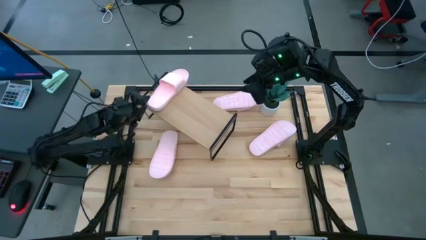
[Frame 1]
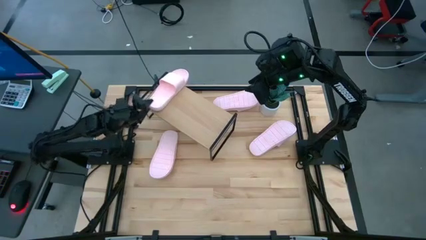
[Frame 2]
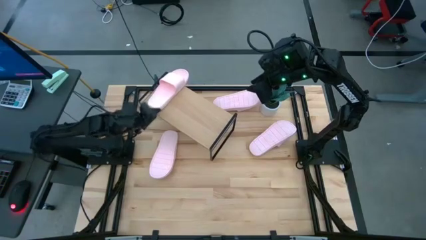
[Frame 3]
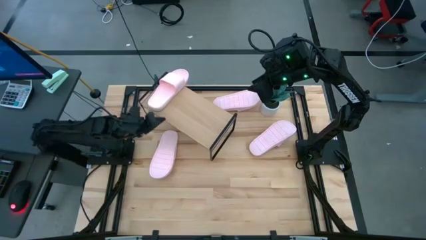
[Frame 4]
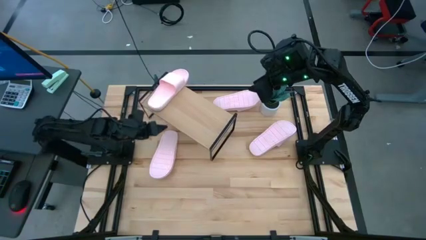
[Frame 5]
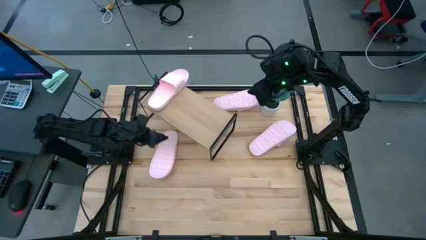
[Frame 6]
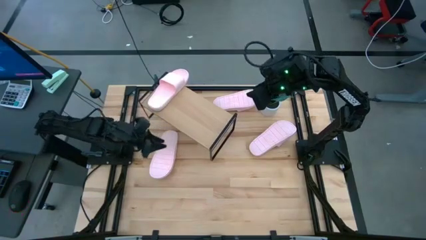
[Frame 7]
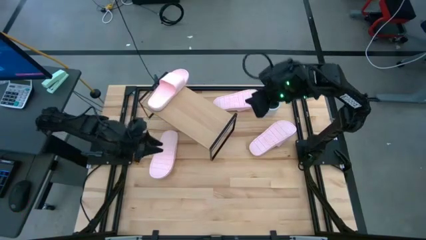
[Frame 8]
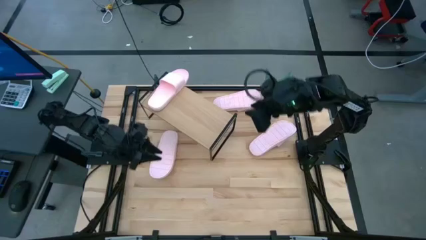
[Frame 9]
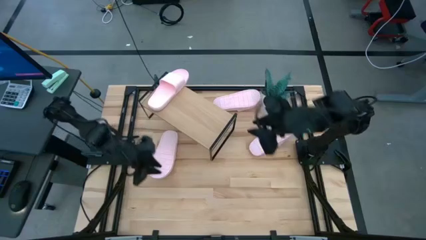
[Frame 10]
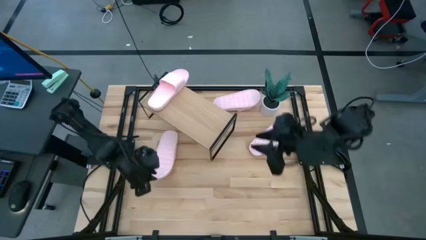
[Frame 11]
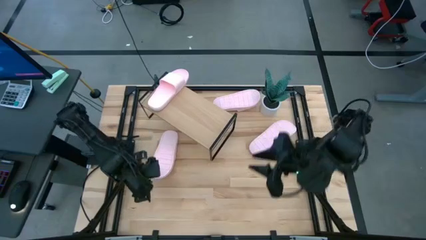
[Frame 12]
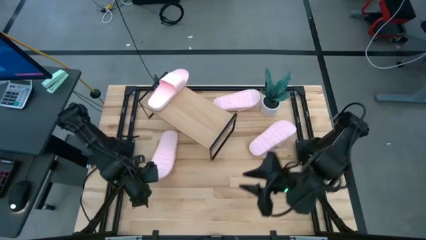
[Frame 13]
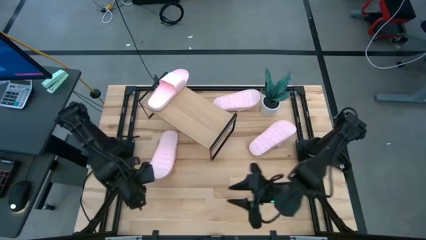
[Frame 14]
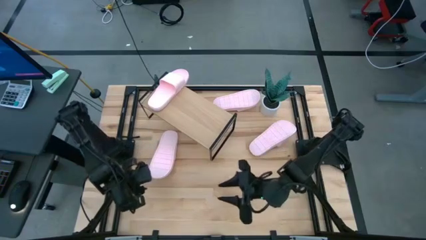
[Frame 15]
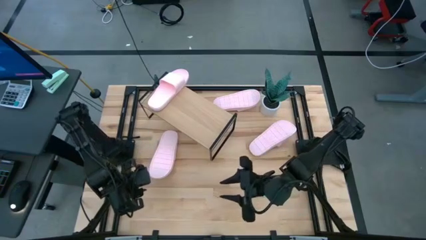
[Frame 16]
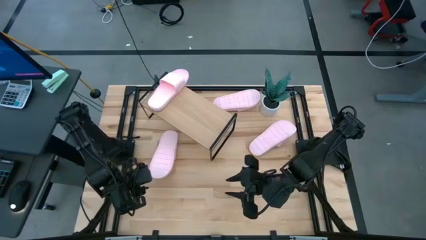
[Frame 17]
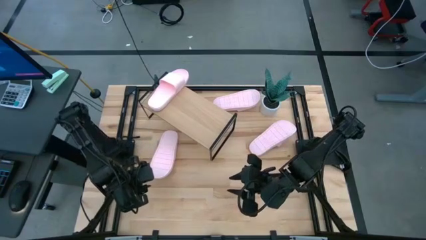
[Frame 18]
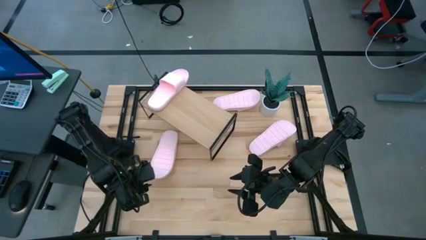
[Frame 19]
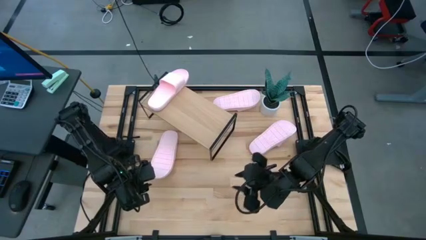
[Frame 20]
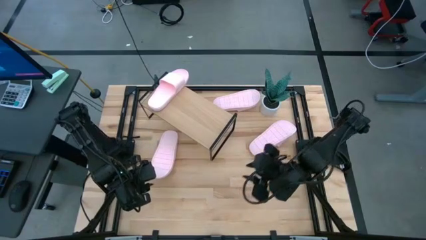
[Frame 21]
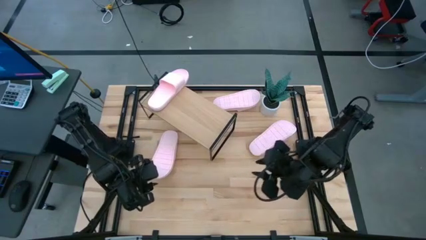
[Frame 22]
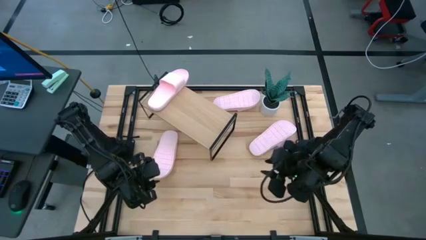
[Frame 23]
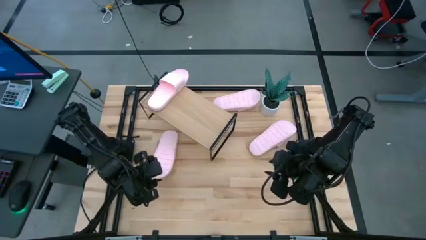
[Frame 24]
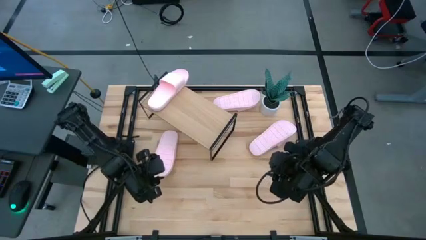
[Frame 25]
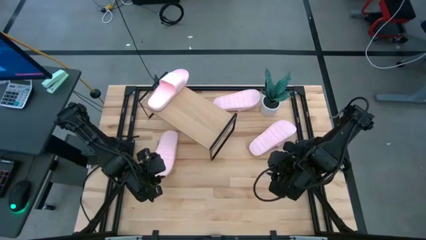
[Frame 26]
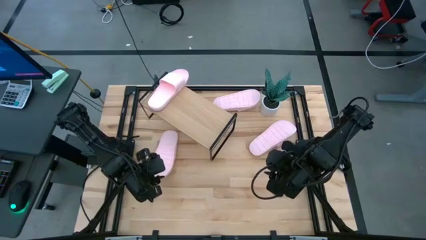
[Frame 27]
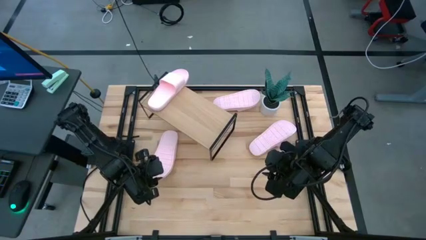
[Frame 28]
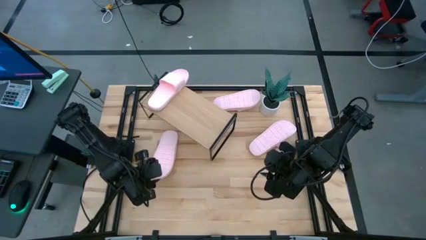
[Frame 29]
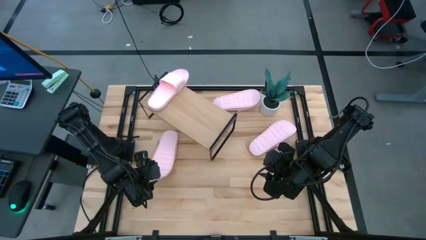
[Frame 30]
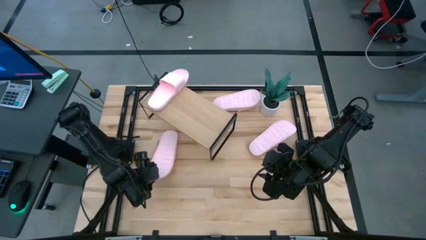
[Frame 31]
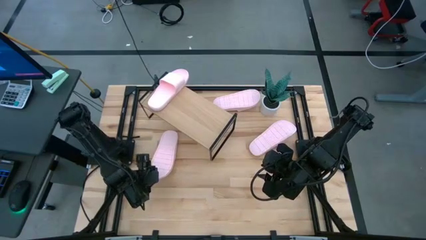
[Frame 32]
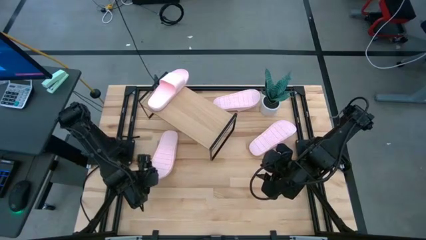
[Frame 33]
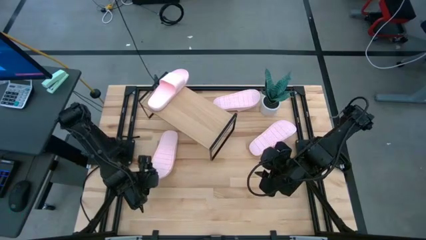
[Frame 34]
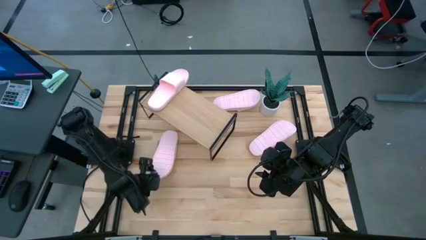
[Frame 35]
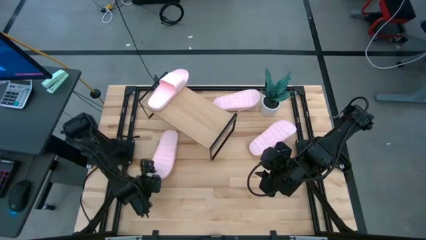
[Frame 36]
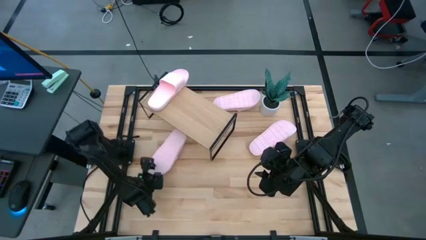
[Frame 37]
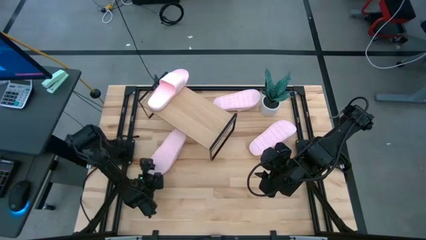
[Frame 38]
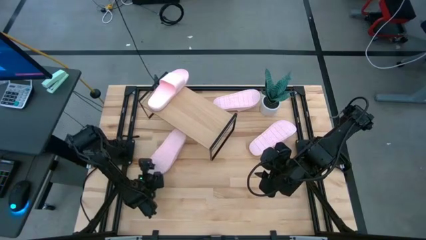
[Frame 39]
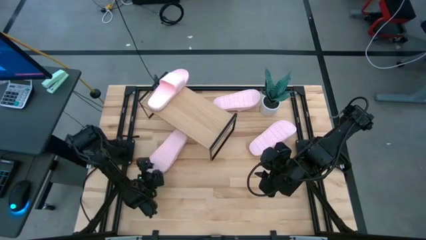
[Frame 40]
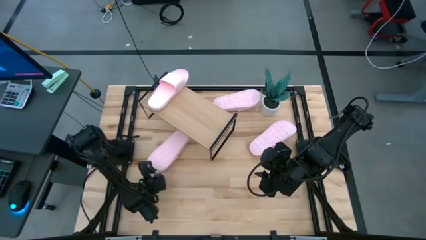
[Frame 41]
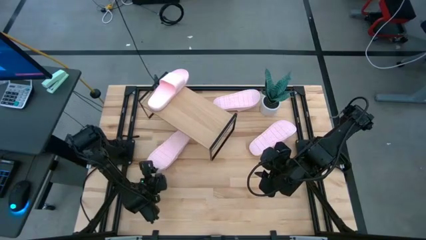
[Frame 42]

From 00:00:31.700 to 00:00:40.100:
Task: Pick and place slides into the shelf
Put the pink slipper on the shelf
